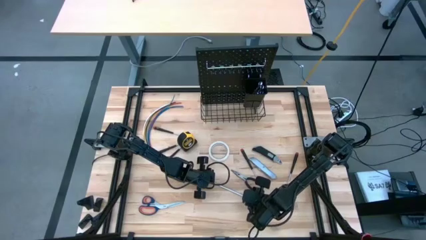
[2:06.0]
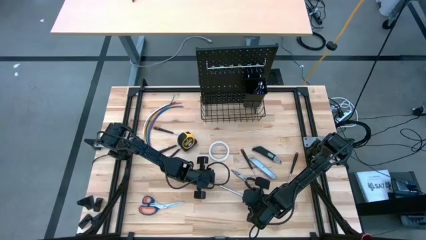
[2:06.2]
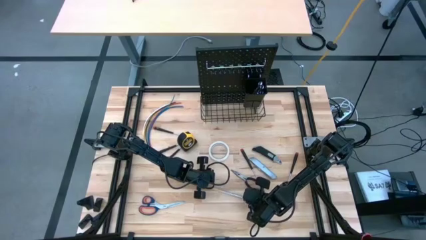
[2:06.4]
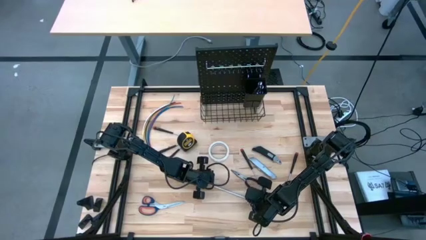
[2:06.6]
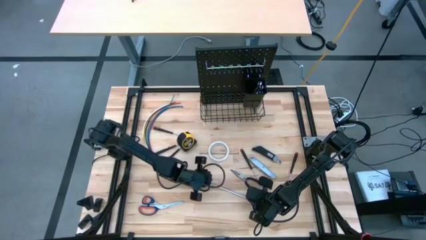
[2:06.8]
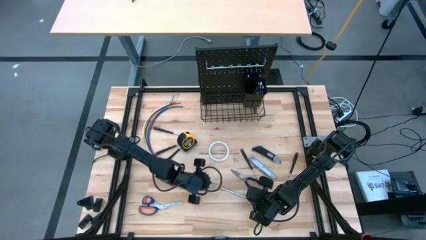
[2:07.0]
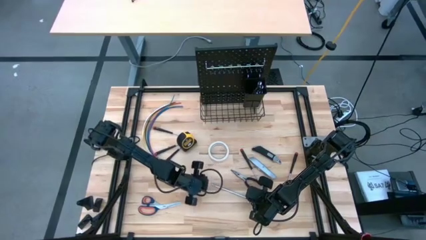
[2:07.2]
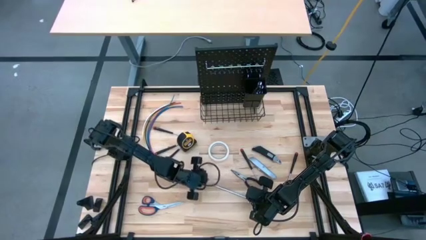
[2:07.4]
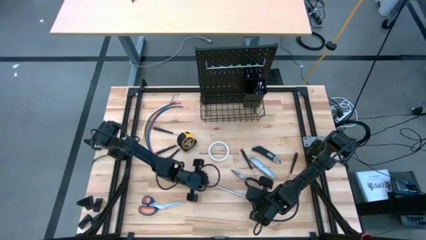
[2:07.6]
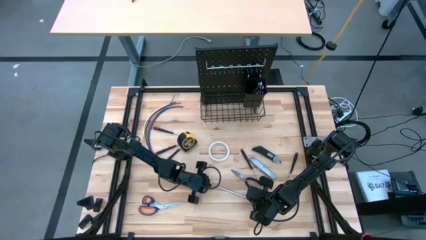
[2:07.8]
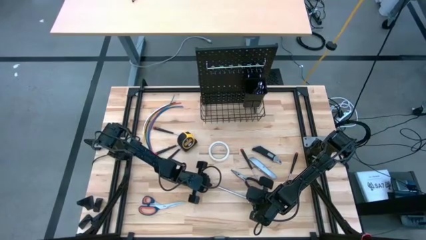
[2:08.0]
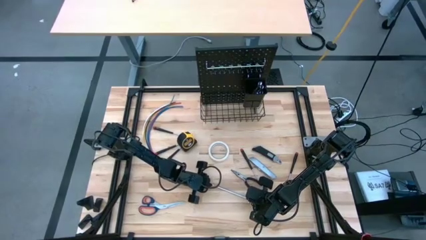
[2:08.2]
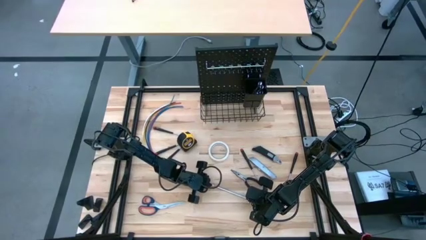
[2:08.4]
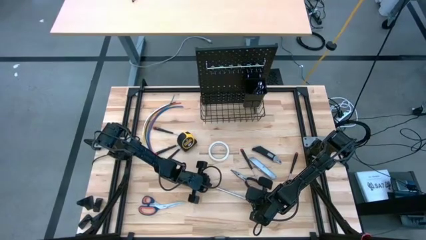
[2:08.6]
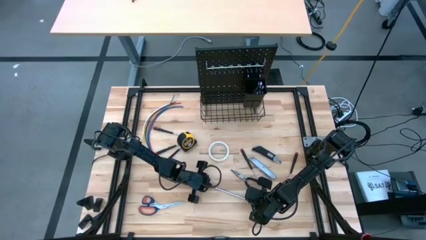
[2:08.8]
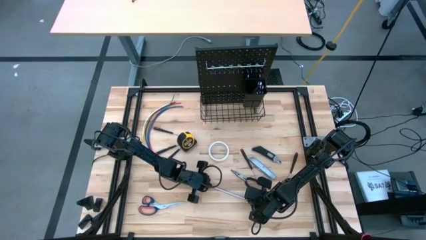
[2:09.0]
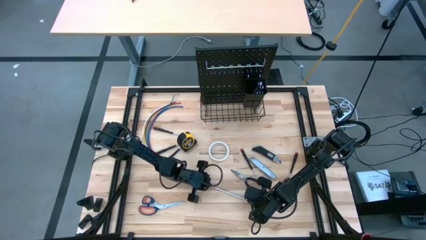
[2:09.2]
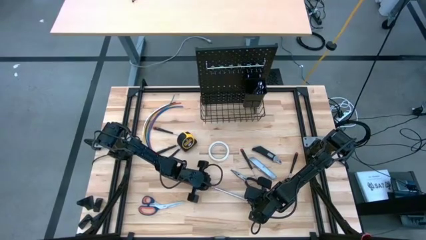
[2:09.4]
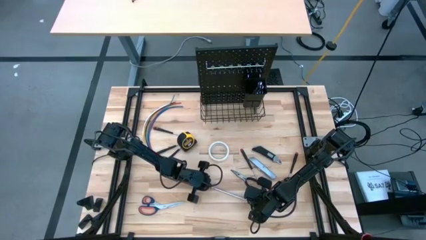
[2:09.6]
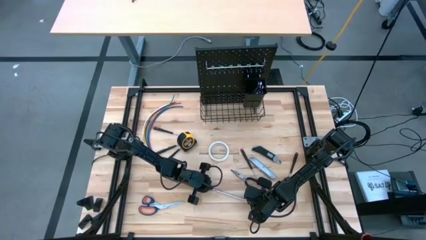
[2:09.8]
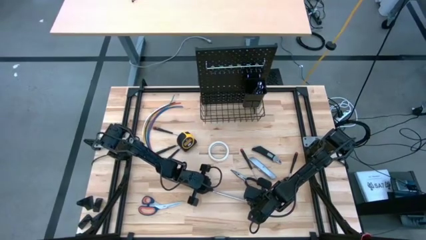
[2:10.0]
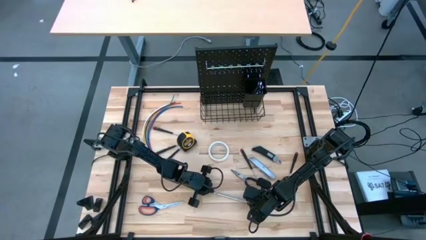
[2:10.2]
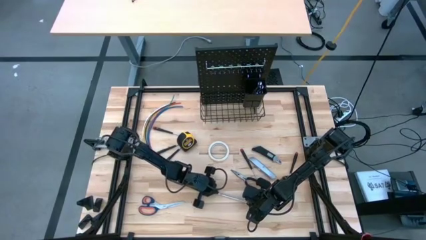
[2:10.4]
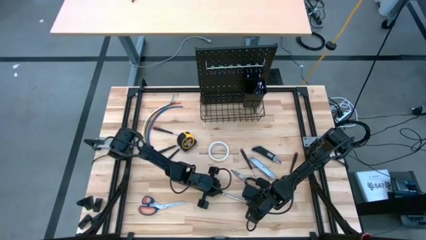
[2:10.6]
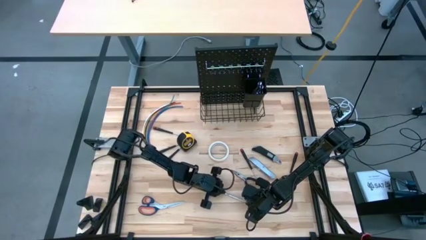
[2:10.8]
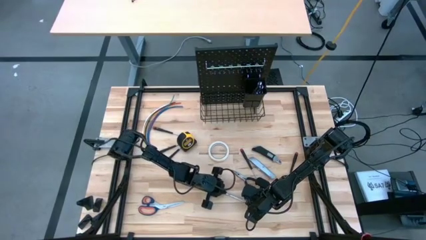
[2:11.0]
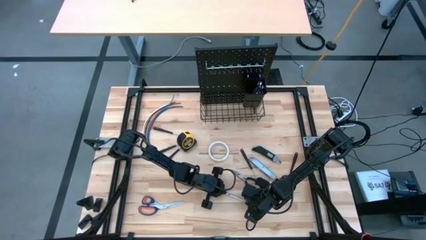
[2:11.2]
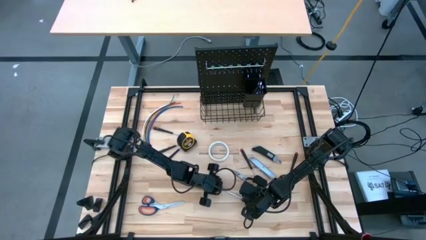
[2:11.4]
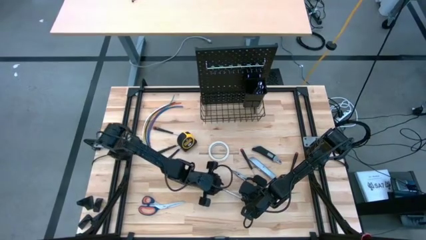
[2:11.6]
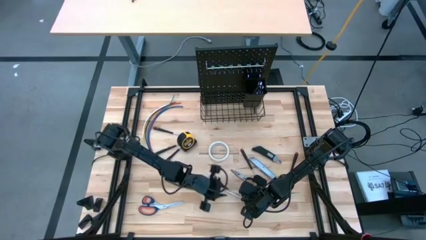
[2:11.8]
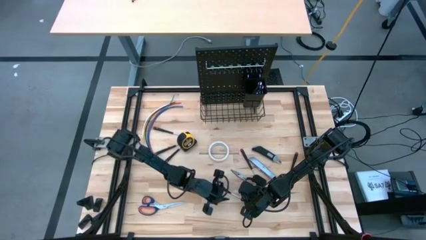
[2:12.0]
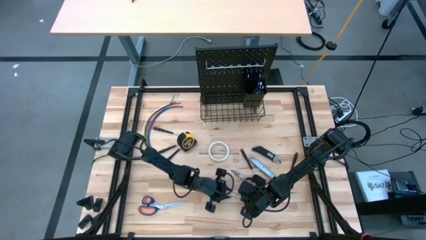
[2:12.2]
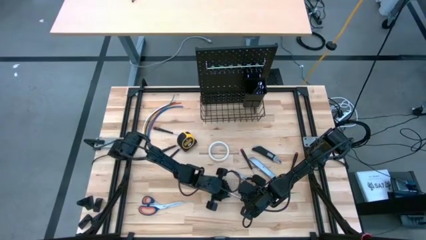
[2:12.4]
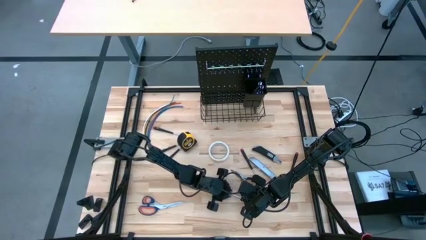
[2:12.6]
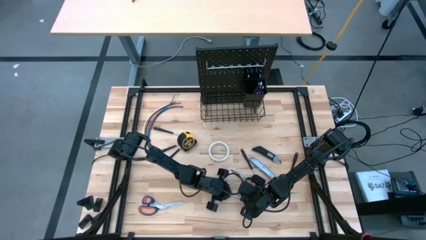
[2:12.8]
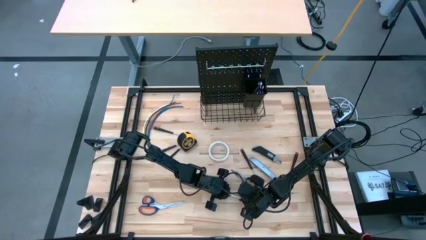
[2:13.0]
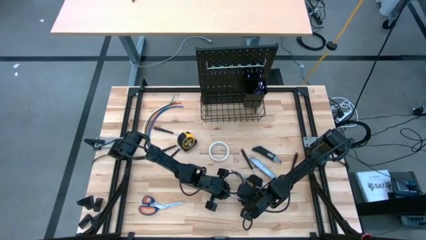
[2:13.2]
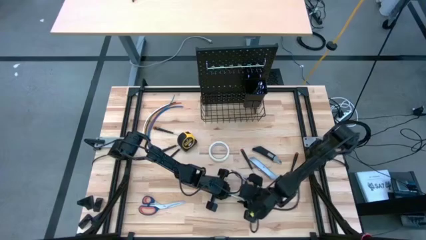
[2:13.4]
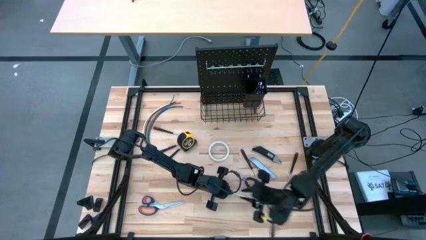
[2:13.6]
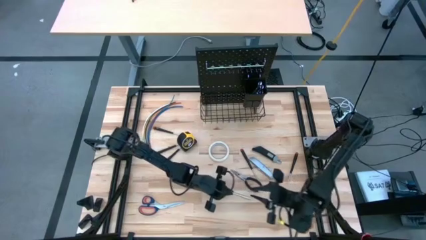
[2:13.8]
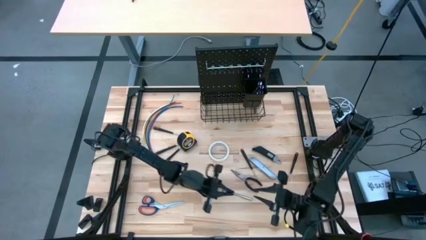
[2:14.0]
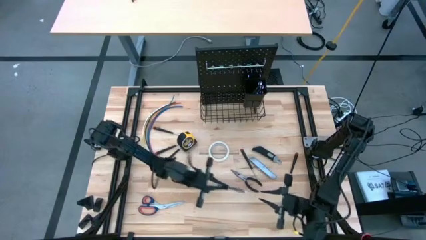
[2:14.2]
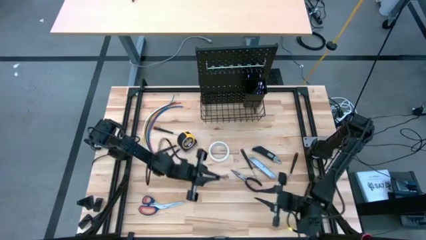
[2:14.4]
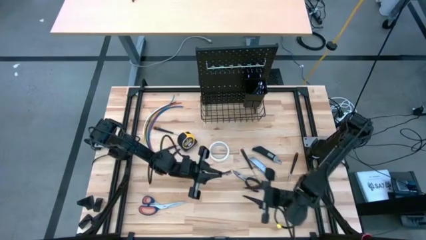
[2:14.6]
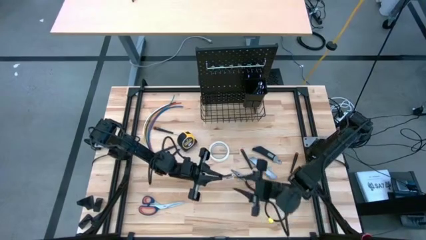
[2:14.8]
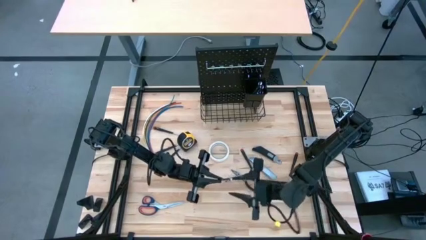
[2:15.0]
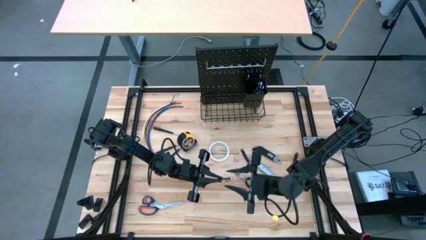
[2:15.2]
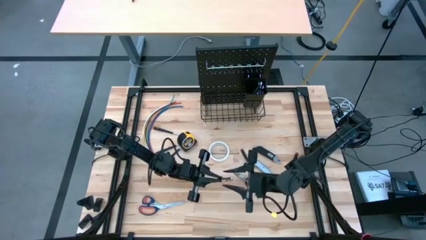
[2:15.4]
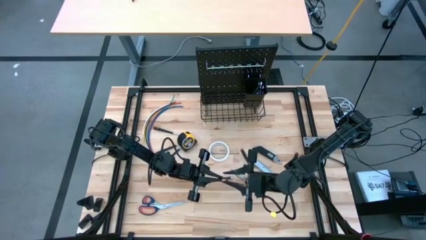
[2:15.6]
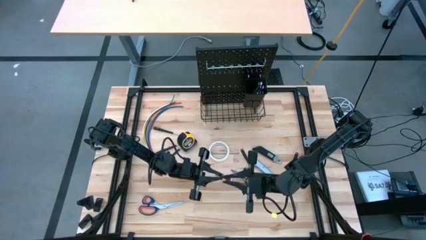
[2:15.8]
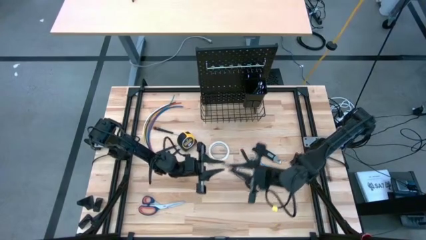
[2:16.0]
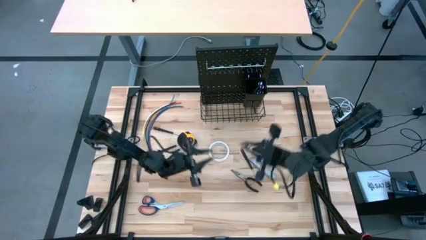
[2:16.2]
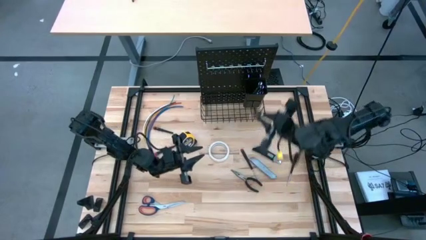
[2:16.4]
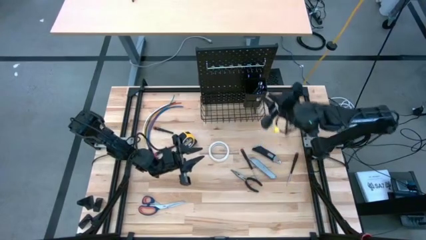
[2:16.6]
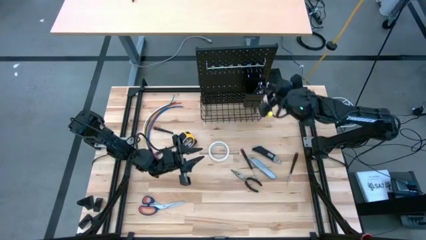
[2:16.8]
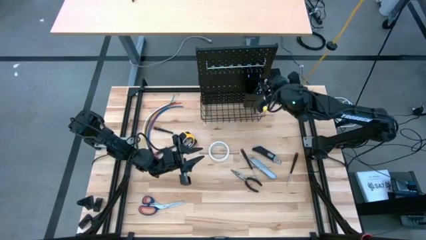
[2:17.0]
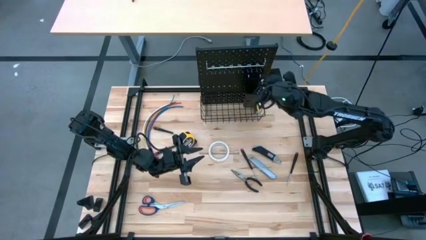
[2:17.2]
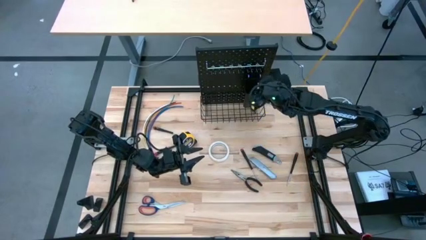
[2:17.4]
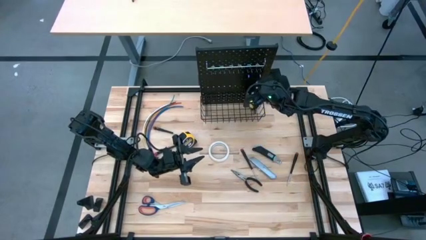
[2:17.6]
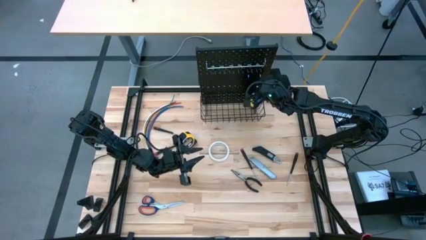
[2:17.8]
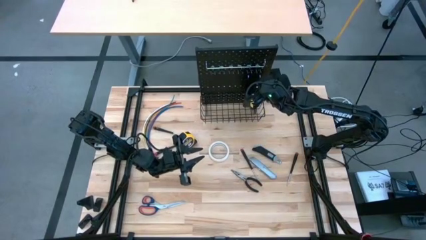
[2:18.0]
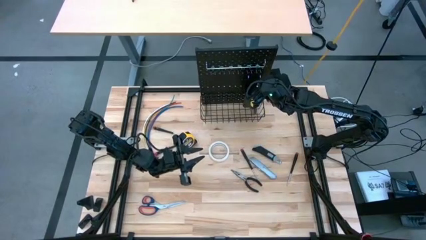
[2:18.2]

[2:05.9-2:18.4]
Task: Hang tools onto peg board
Put the tire pressure gauge pen into the black bin on the peg board
